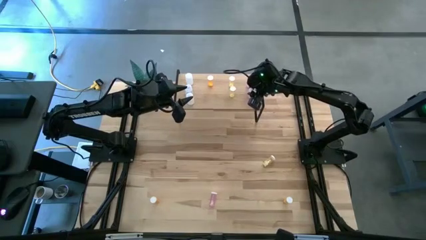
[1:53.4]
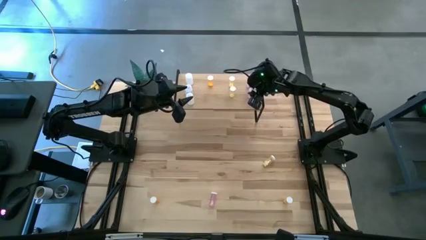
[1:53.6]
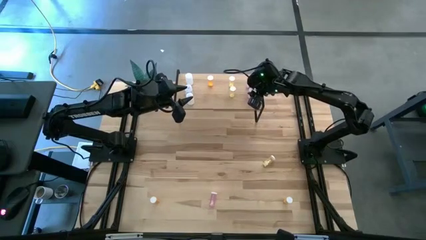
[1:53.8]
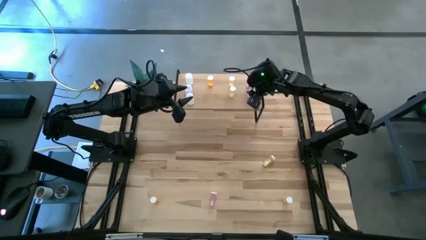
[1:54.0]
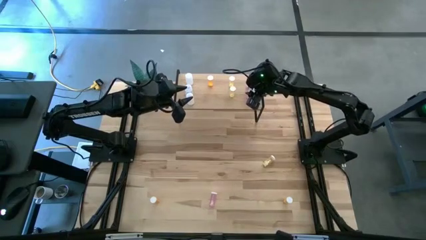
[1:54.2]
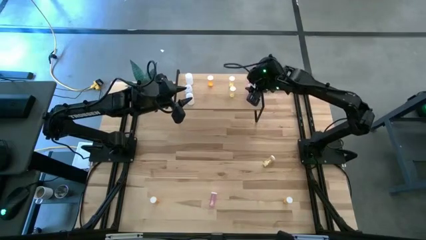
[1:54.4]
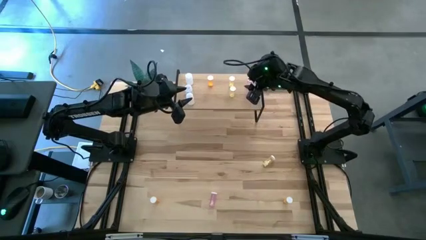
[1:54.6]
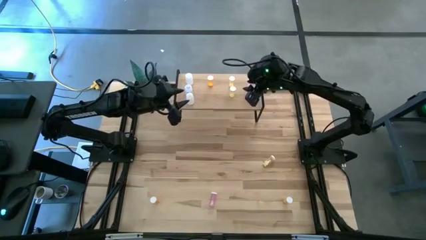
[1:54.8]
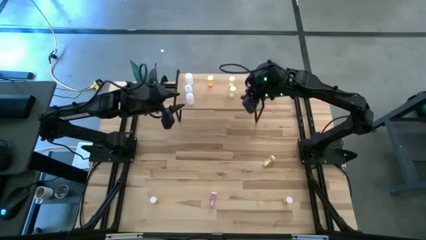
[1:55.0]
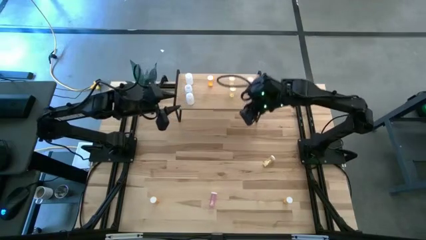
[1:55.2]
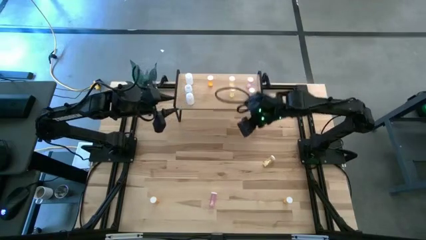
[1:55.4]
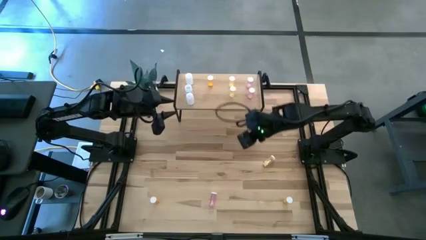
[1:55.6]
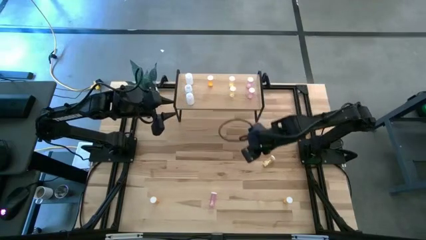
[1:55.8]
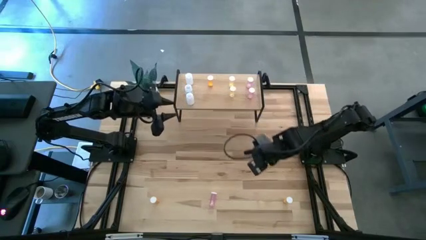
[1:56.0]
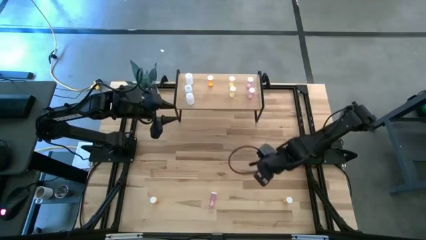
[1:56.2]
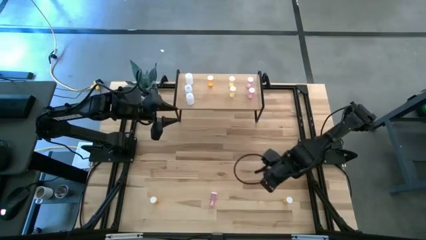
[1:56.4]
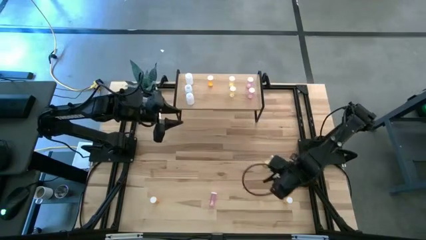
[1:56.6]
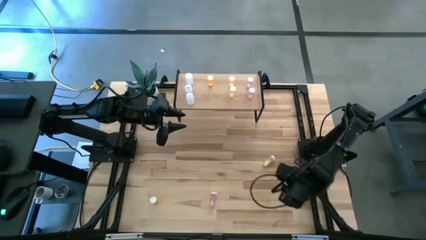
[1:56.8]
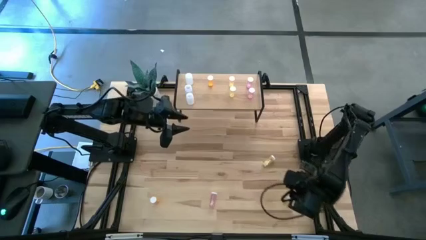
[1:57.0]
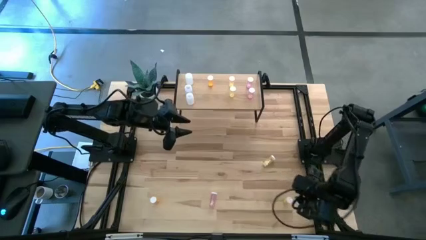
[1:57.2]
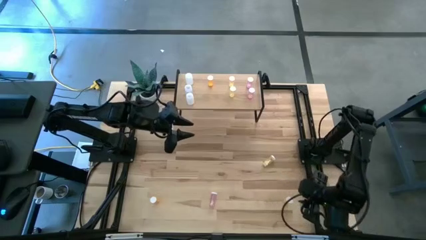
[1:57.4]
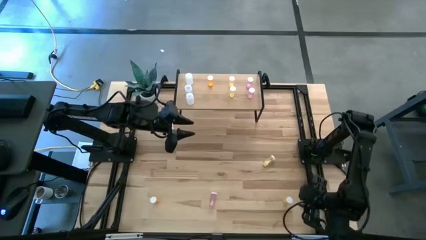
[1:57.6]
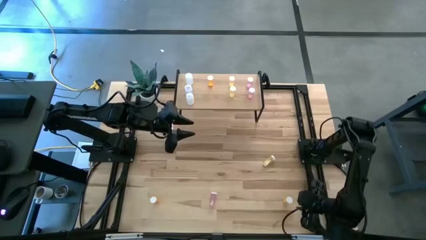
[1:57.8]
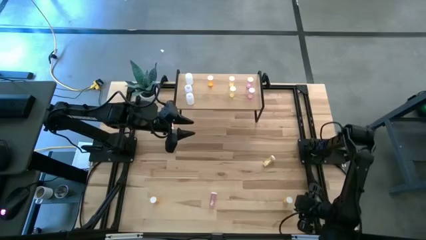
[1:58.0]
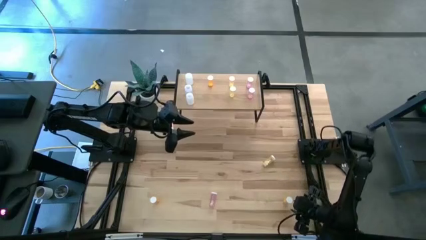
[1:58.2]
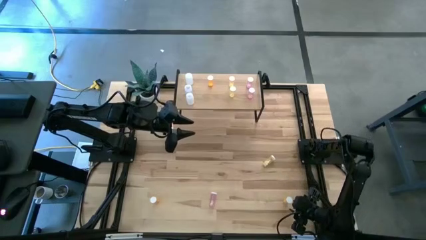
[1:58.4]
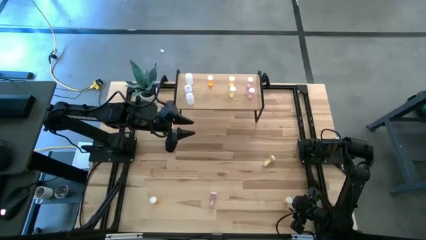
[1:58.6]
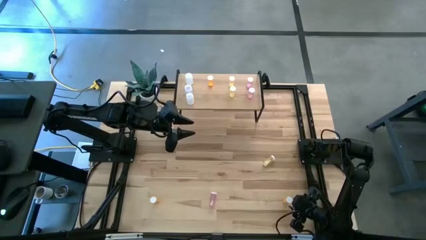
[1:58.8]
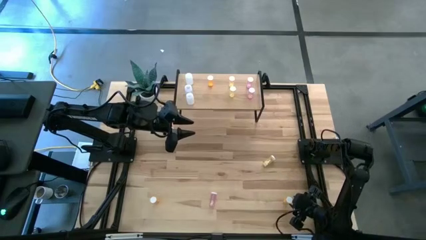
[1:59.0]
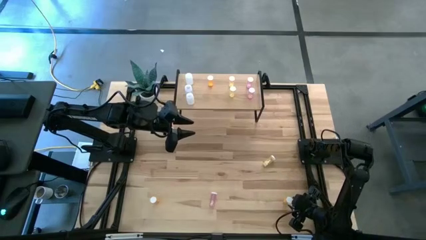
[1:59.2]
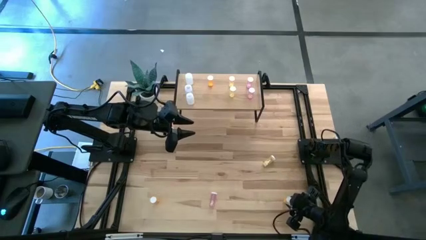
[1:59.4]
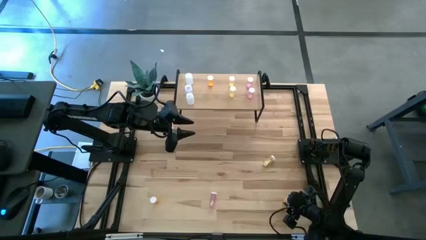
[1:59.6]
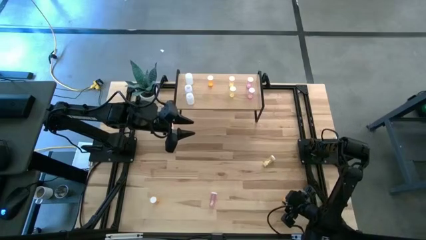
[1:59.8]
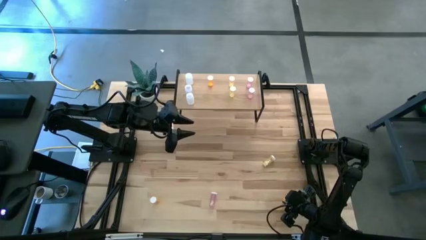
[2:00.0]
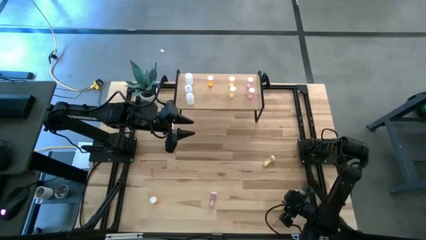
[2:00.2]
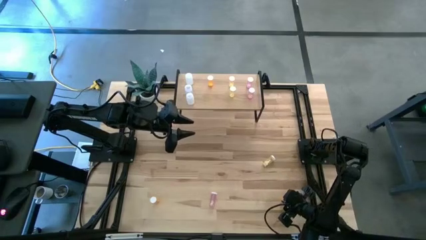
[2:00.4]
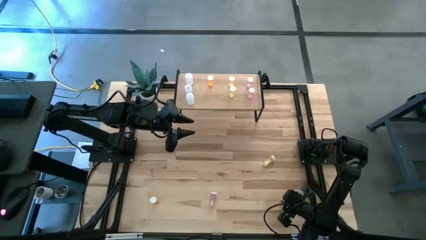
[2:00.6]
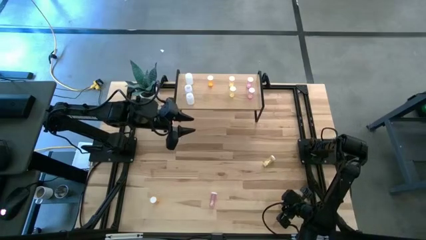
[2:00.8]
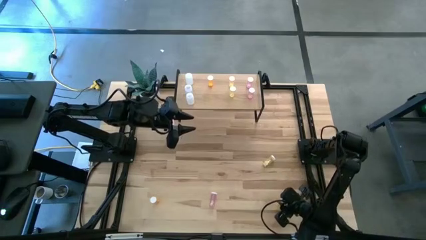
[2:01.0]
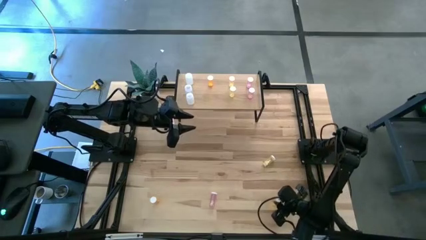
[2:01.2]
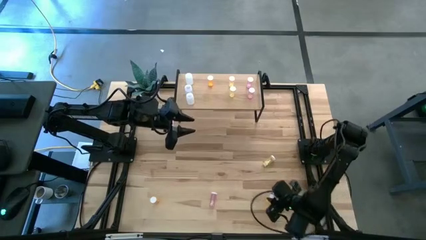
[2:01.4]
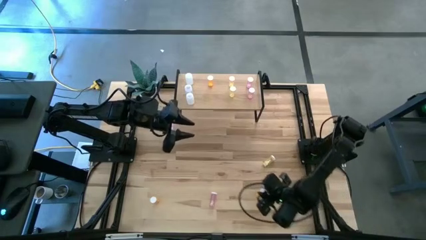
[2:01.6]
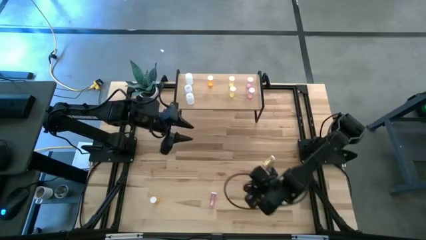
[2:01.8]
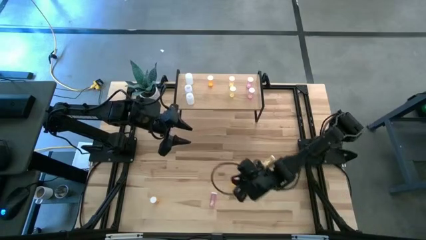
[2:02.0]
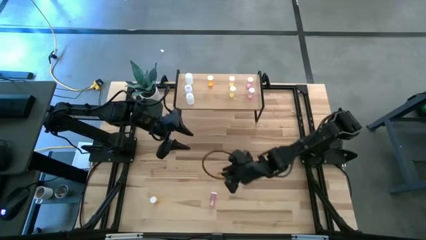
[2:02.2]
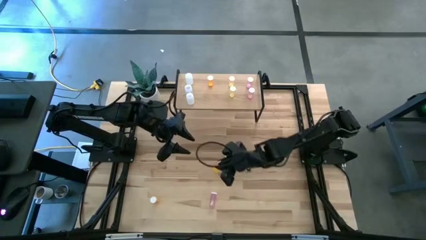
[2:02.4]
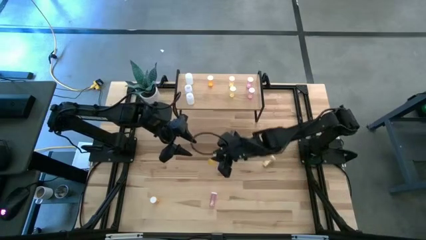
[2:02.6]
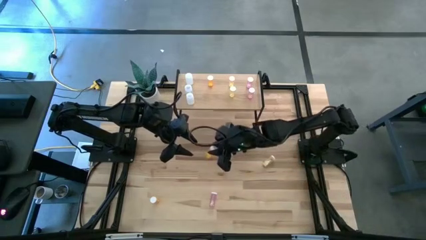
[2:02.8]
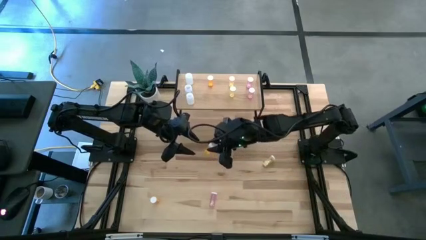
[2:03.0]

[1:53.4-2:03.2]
Task: Pick and place medicine bottles onto shelf by color
Put the right orange pill bottle on the shelf aligned with the other orange pill bottle

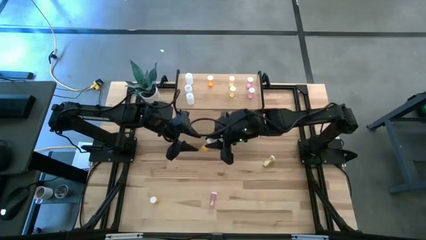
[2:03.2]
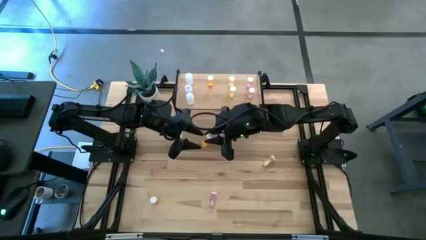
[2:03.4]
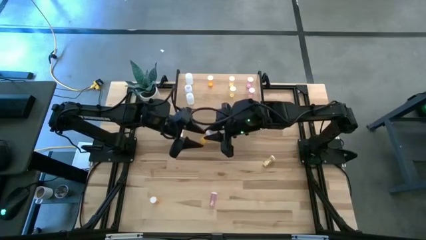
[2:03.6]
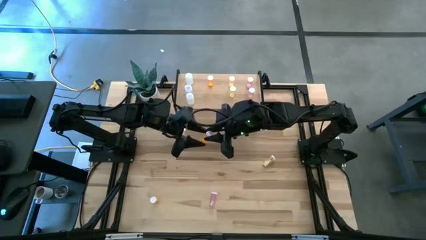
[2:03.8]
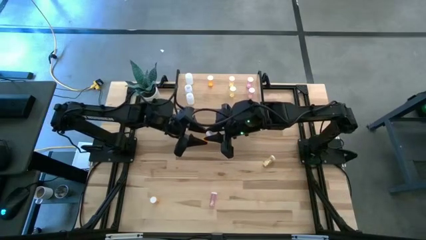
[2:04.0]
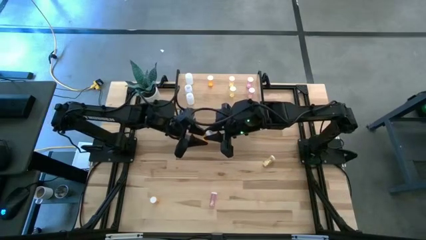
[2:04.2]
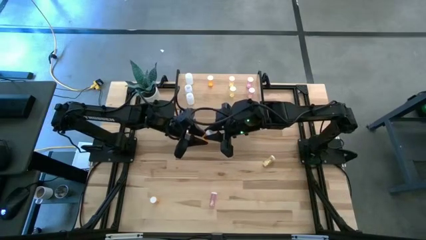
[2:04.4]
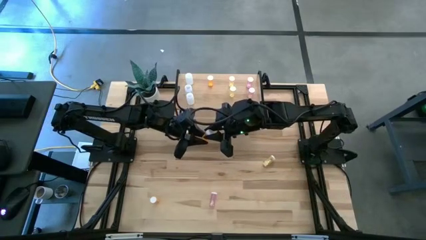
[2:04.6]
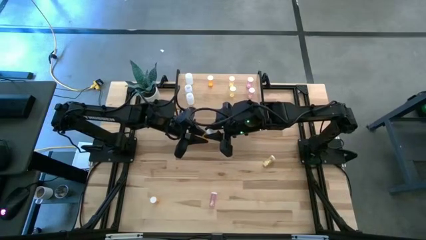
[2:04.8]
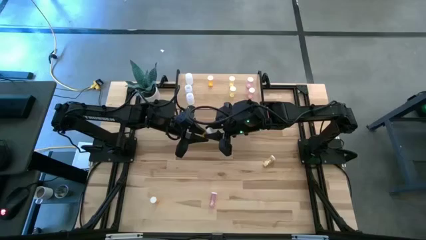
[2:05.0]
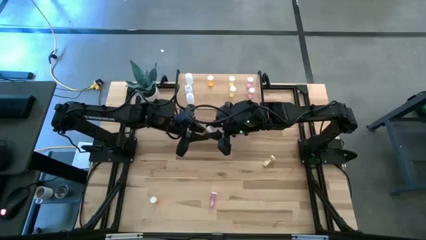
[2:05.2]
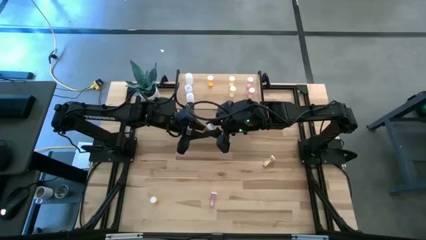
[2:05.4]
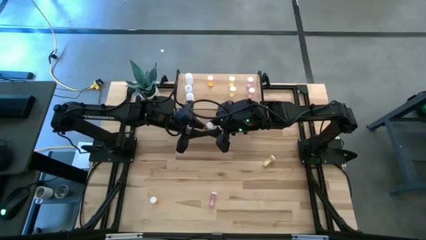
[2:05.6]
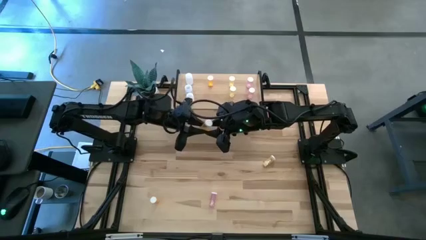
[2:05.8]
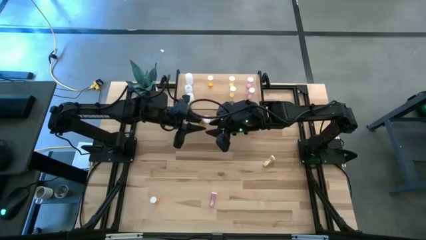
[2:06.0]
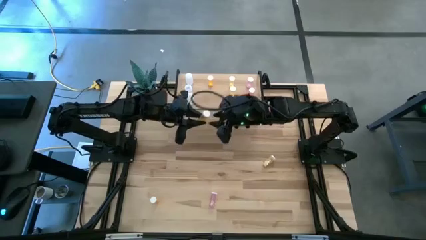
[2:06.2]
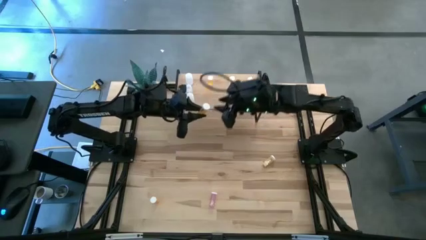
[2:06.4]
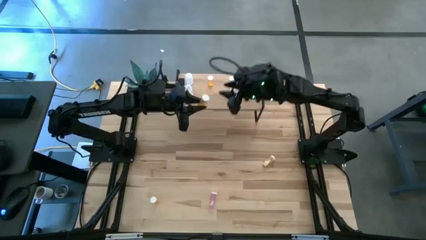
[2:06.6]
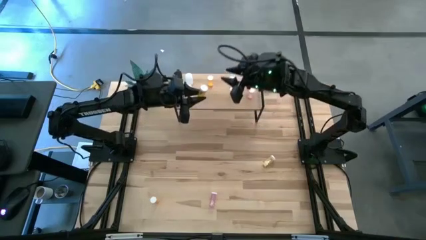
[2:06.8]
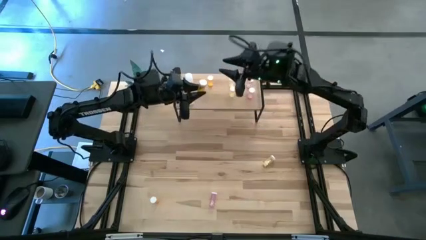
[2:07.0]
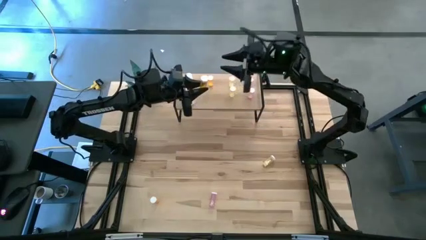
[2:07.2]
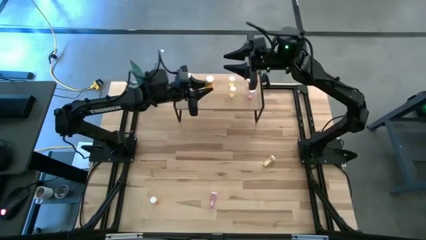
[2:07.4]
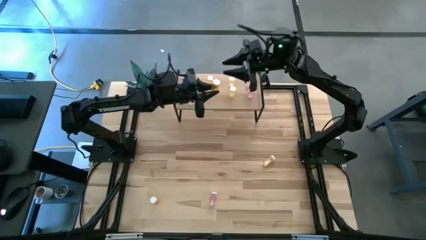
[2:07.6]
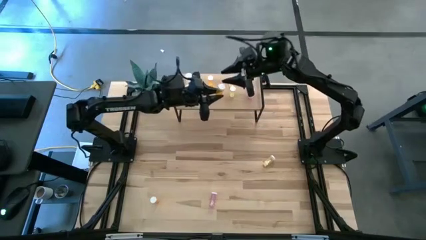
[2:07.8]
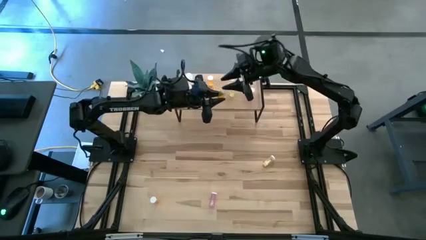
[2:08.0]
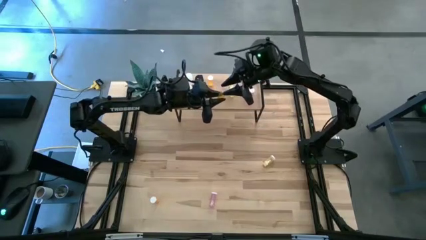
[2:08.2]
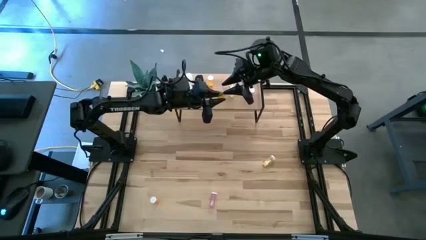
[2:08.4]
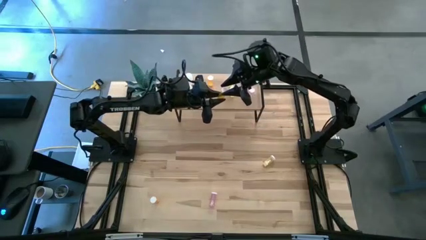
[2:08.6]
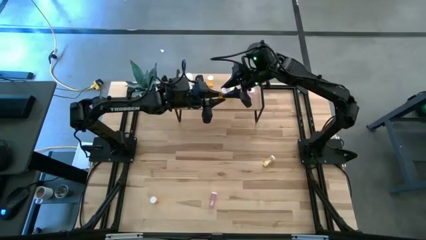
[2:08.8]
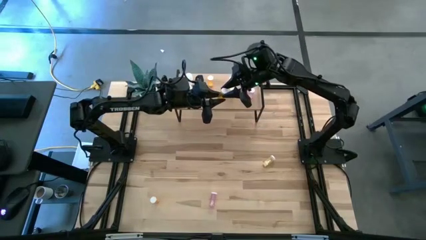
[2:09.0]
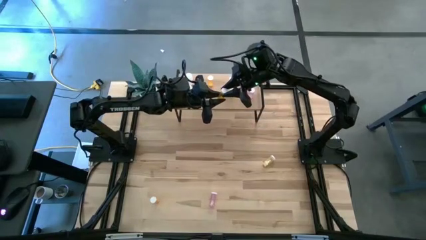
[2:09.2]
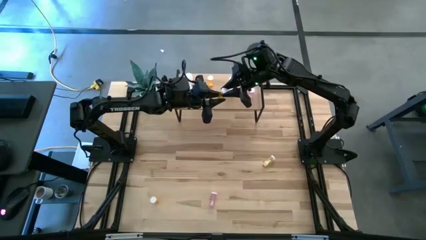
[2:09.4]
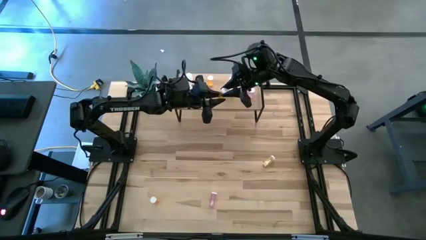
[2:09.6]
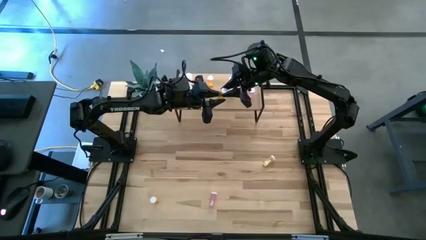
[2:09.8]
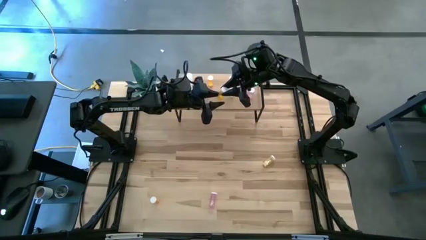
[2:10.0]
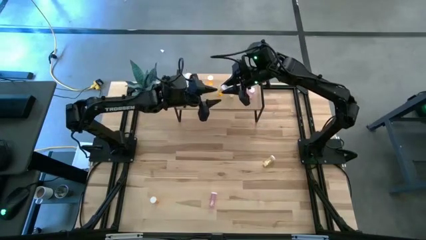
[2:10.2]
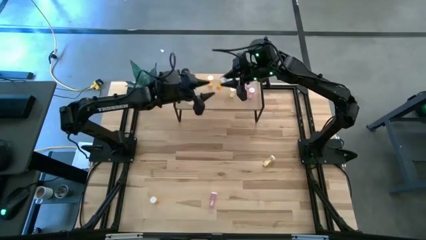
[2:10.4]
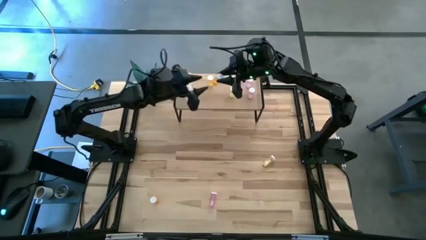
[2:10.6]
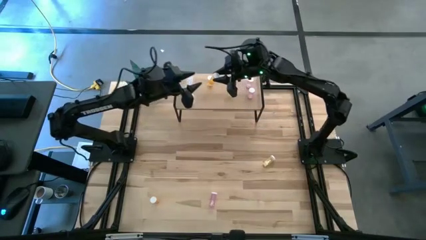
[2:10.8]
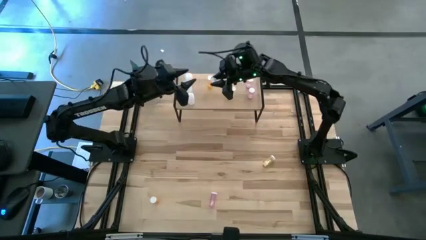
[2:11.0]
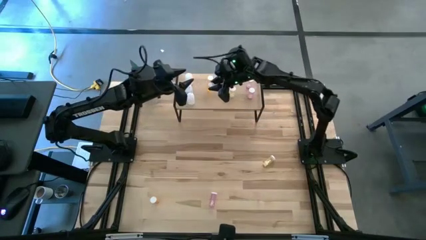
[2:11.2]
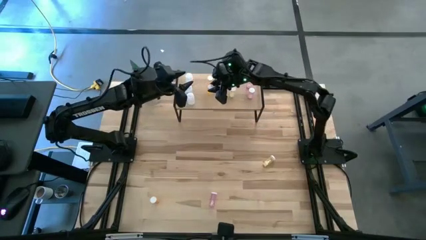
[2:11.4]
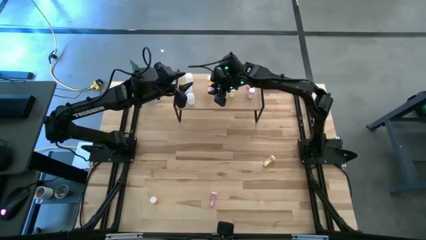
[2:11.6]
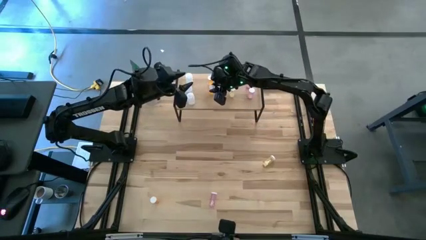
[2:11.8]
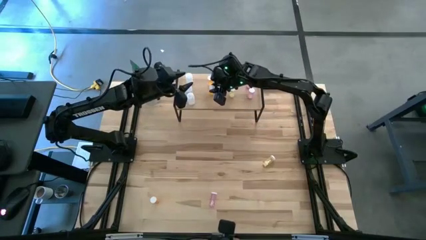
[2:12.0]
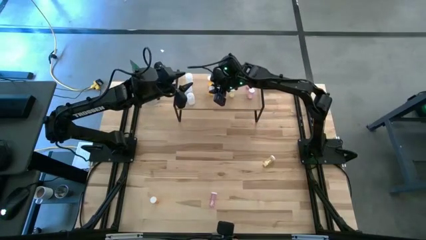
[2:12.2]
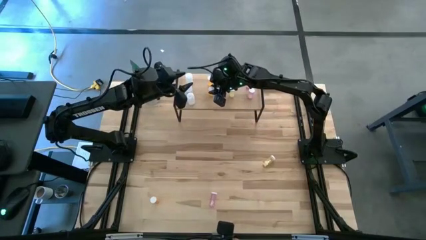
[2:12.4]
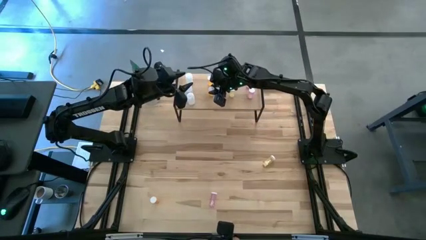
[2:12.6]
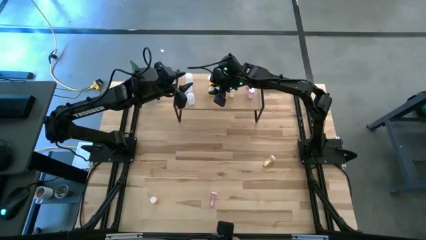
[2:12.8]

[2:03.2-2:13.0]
Put the right orange pill bottle on the shelf aligned with the other orange pill bottle
